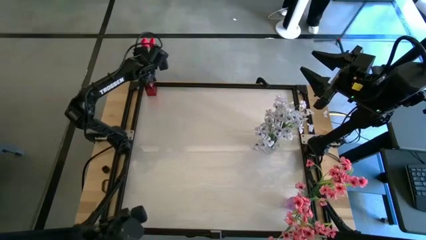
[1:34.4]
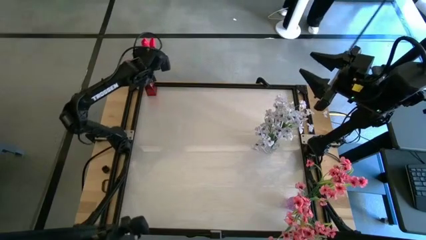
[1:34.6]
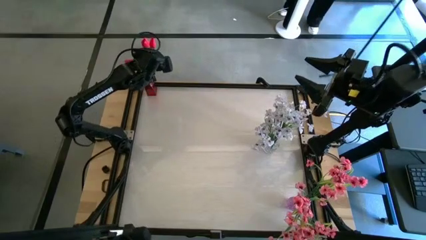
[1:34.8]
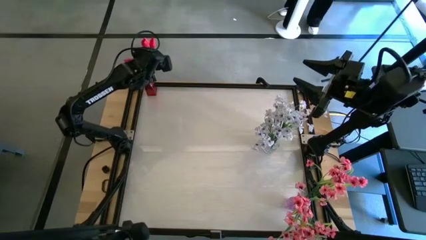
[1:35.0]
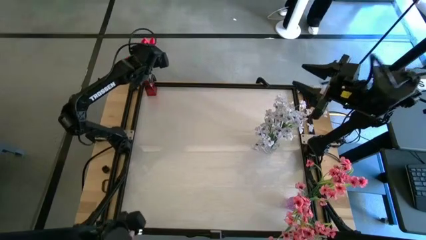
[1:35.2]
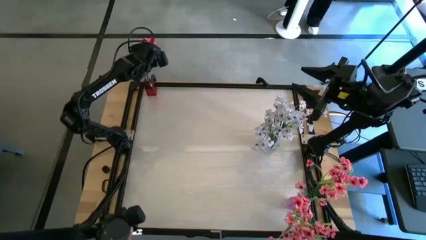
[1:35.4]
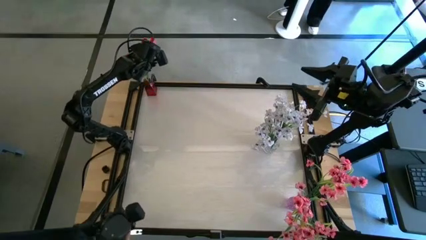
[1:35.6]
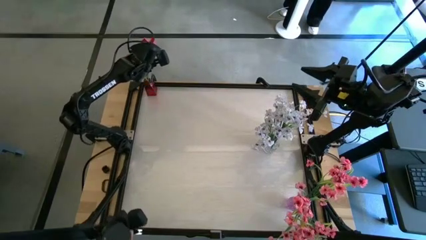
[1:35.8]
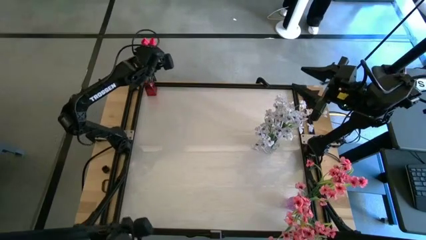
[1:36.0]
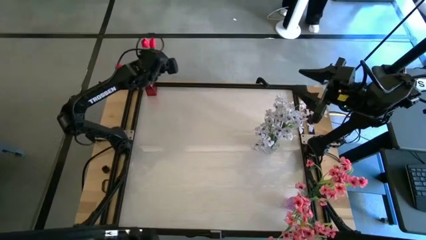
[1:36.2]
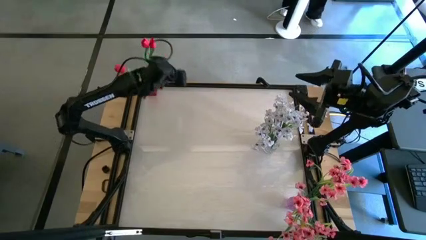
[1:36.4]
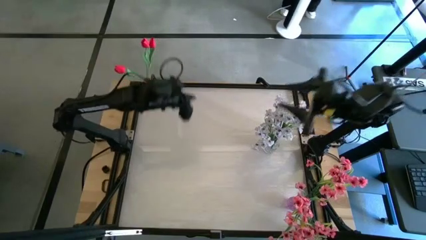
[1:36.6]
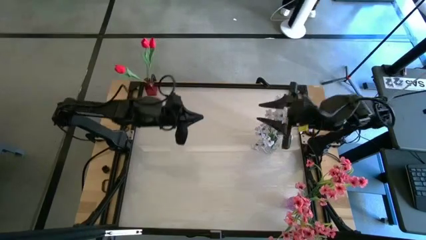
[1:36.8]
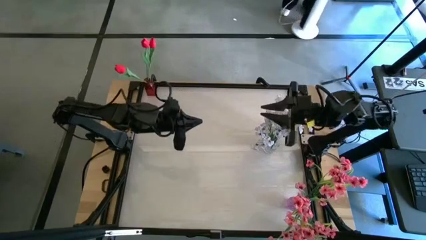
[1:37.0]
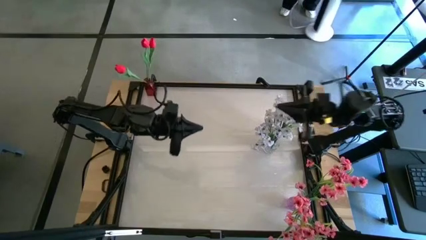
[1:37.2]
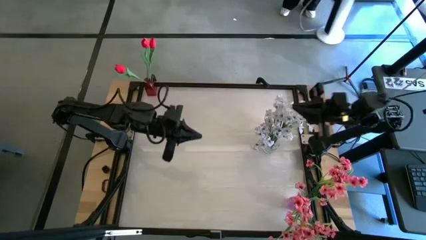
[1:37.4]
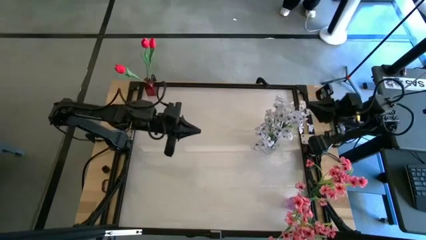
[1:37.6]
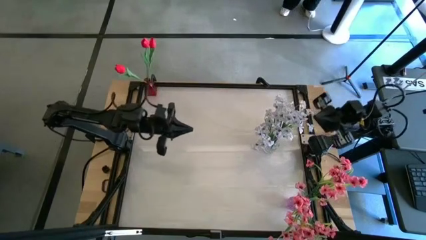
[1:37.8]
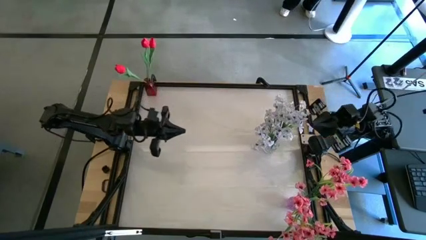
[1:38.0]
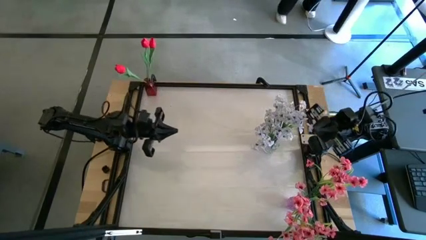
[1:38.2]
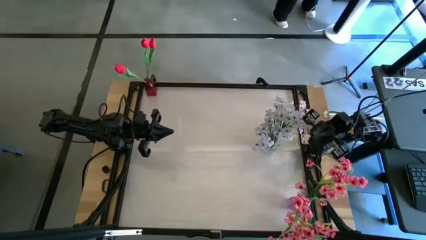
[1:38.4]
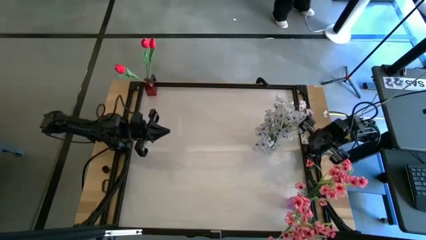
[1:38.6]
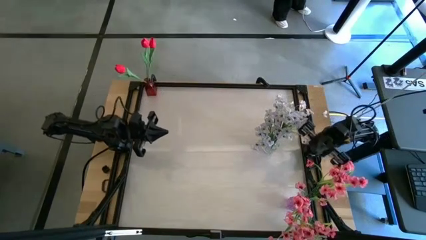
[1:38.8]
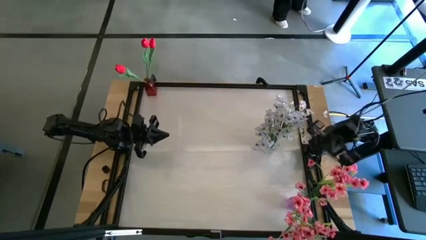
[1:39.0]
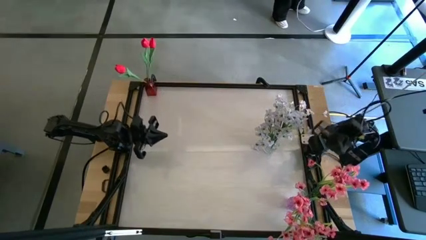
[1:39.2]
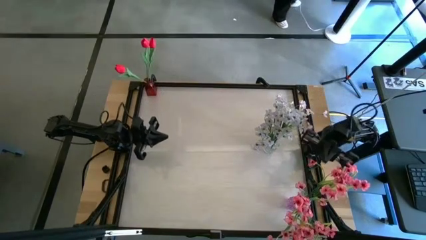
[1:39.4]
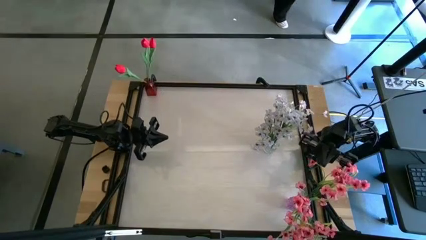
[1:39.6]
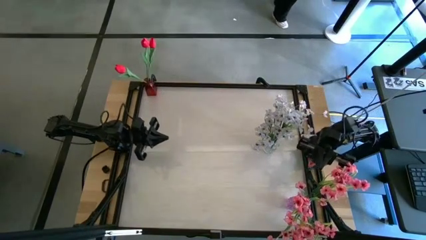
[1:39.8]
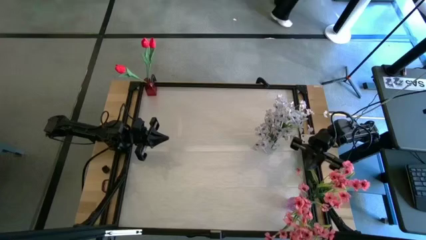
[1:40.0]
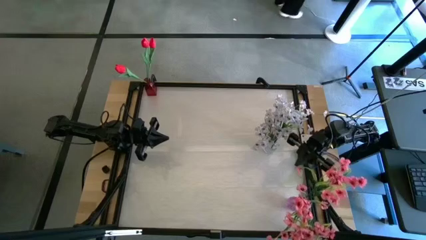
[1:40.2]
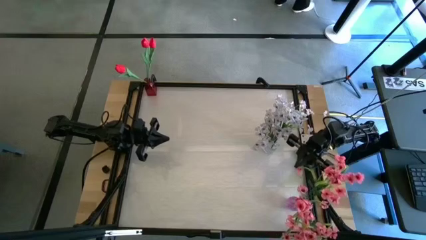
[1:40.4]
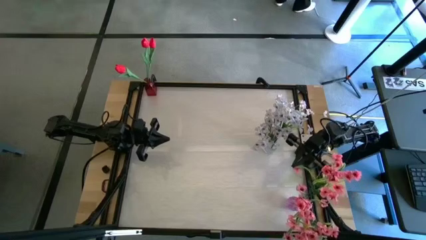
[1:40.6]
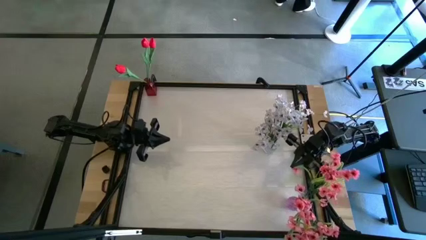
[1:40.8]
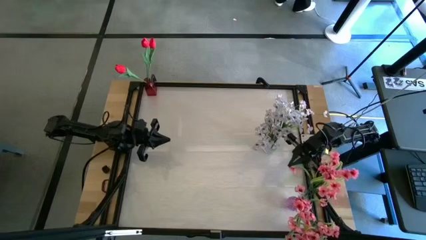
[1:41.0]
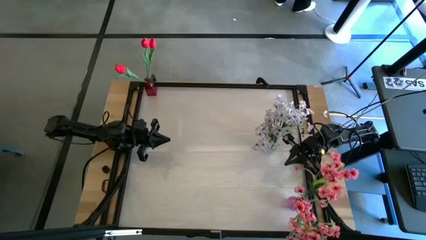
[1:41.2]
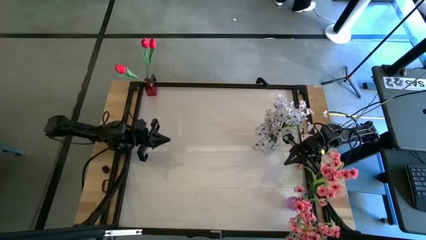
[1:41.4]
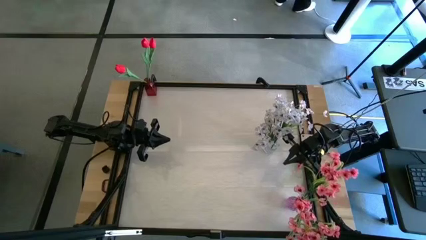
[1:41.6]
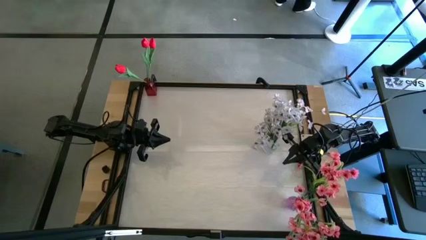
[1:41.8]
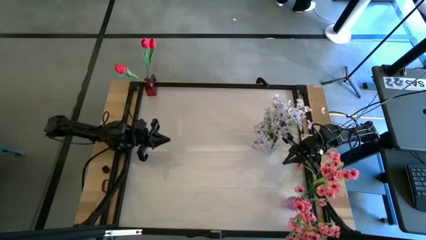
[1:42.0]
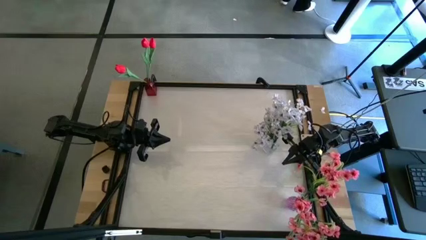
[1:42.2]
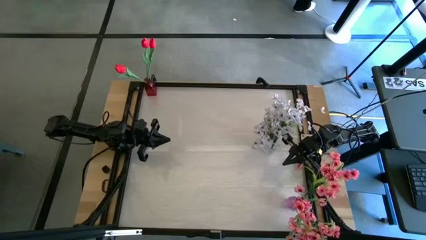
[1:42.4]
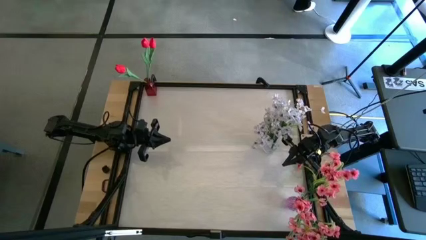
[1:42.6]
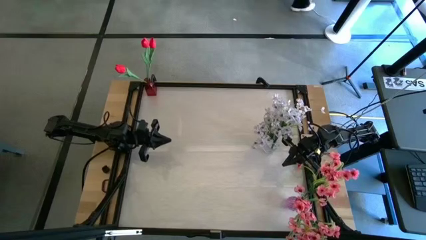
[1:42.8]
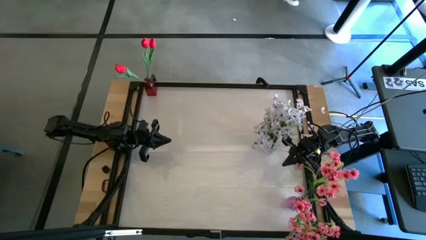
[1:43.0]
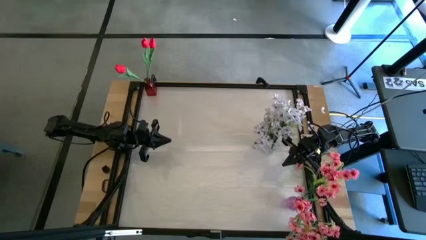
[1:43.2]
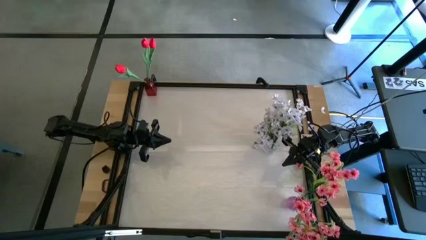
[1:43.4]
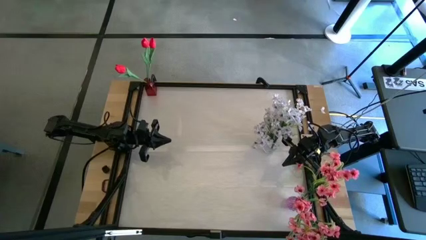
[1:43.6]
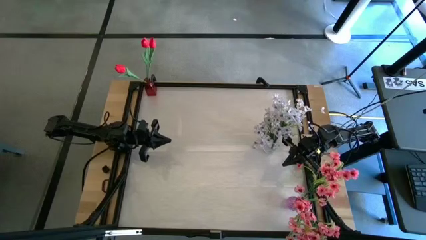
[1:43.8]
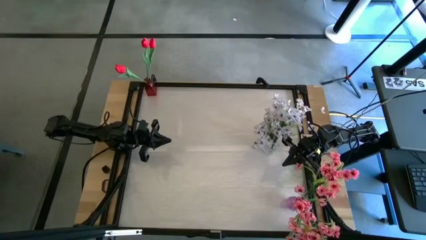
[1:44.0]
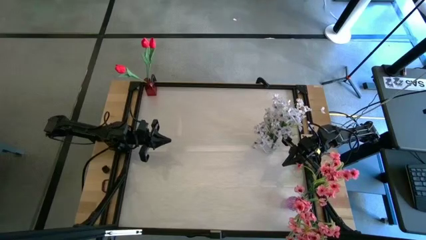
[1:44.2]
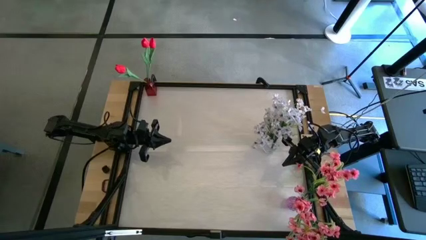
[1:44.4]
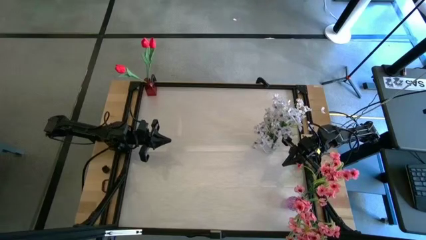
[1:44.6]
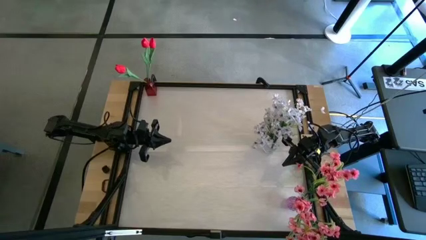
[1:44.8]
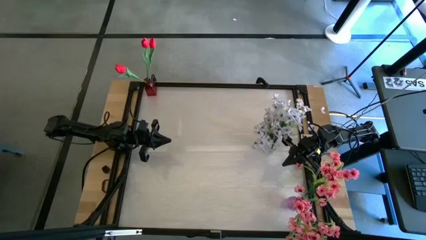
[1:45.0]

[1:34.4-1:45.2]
Task: Sort flowers into vase by color
Return to Home Position
